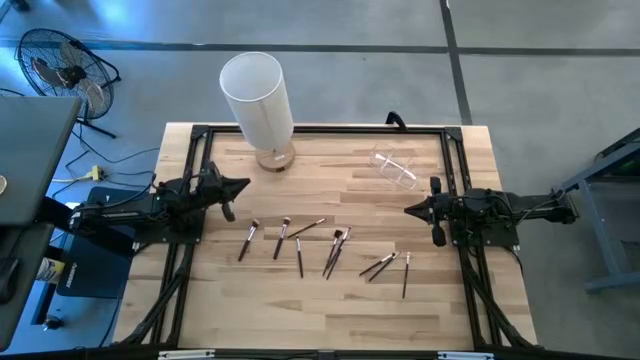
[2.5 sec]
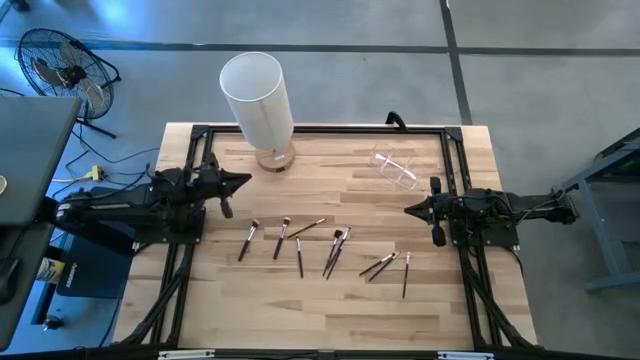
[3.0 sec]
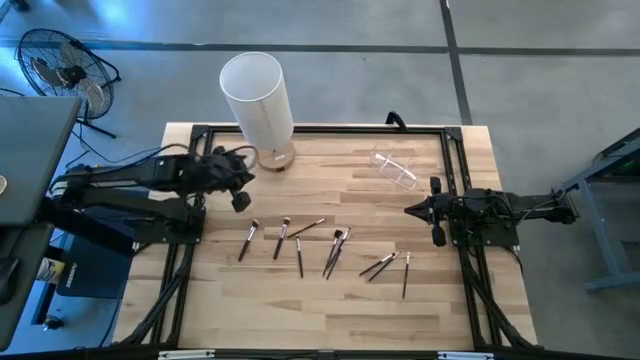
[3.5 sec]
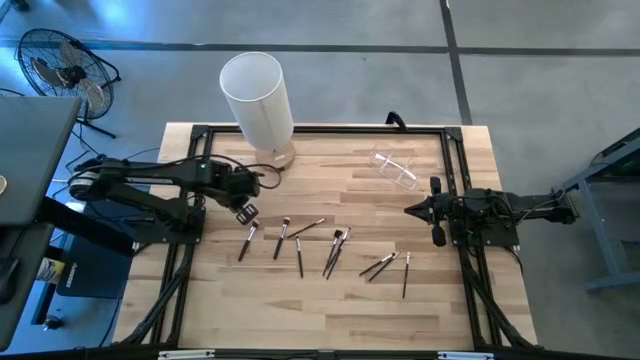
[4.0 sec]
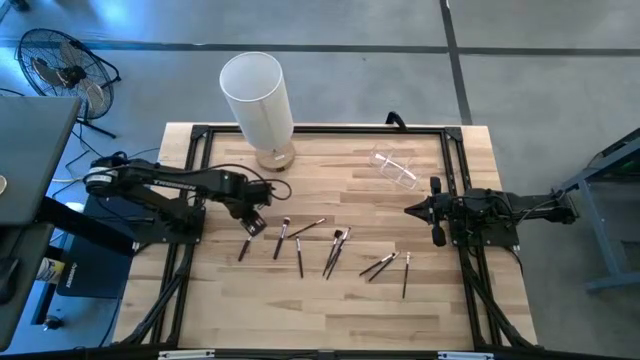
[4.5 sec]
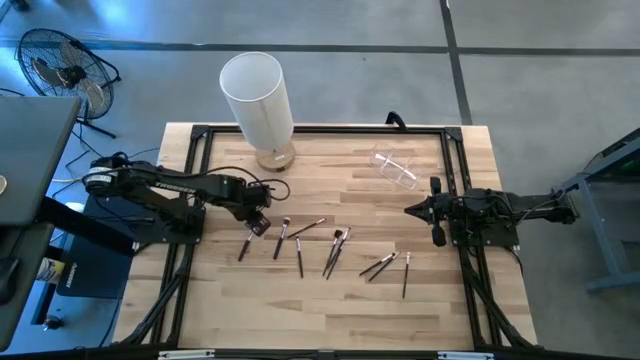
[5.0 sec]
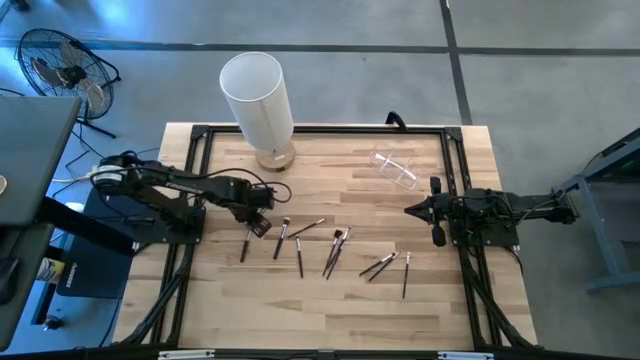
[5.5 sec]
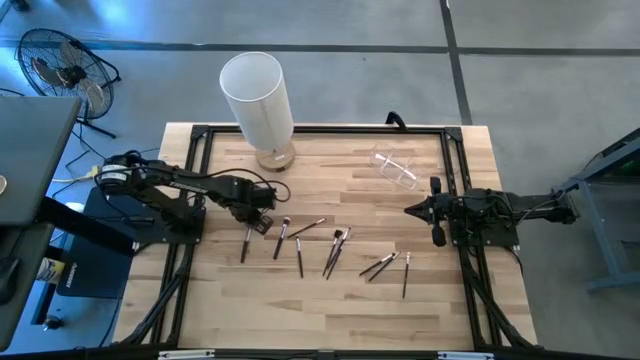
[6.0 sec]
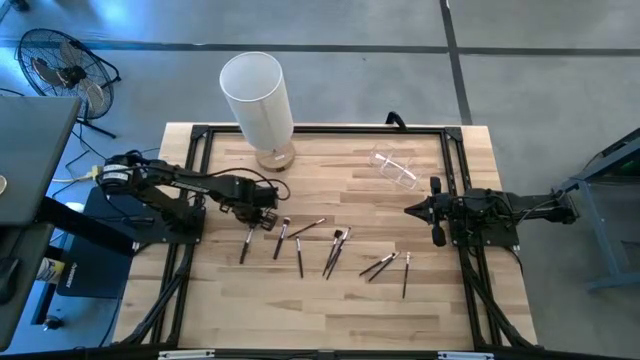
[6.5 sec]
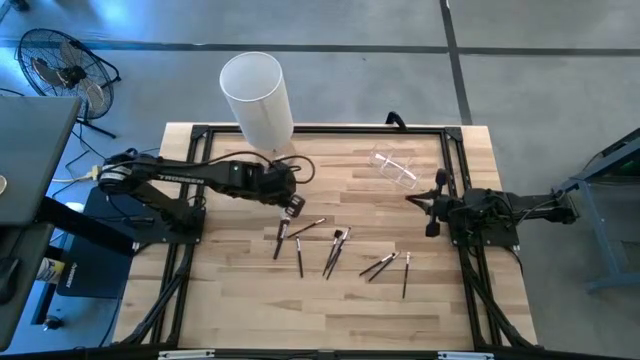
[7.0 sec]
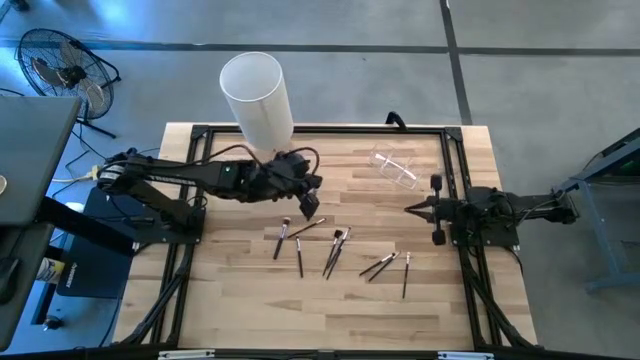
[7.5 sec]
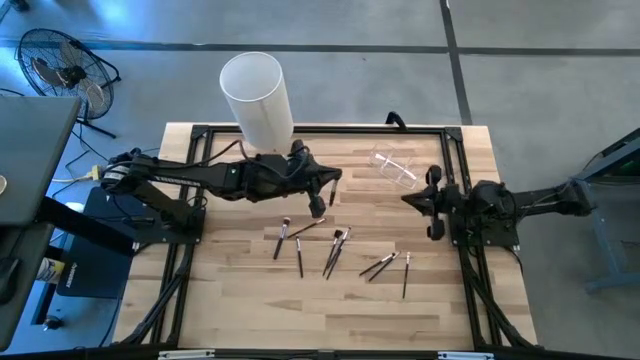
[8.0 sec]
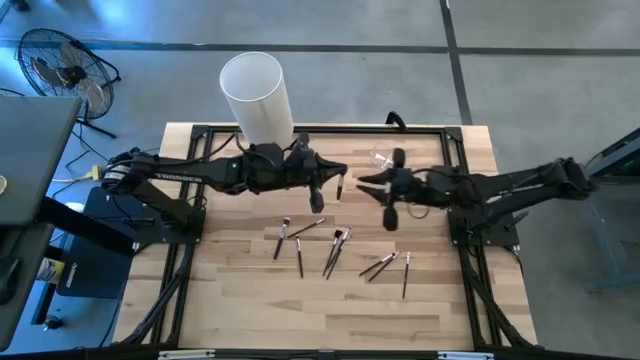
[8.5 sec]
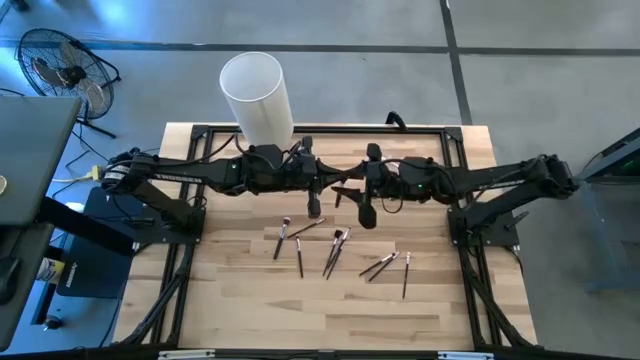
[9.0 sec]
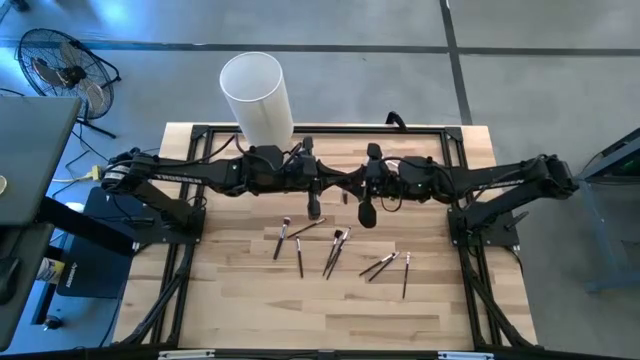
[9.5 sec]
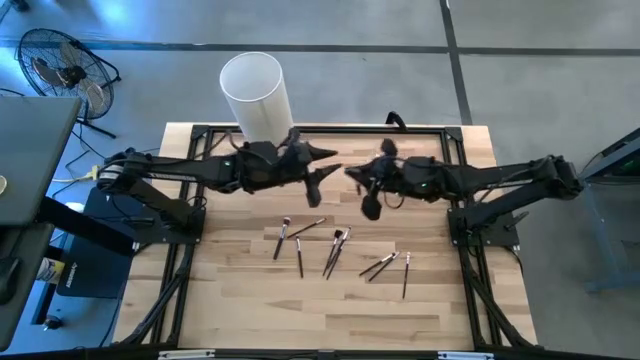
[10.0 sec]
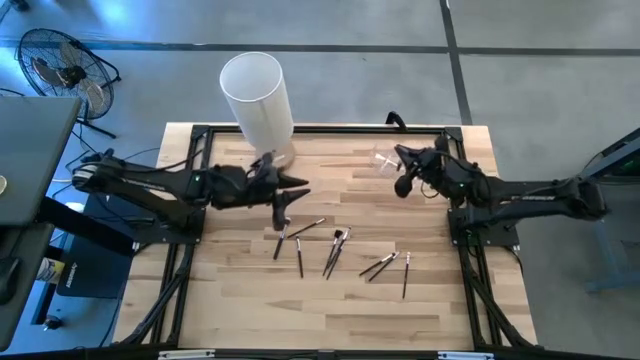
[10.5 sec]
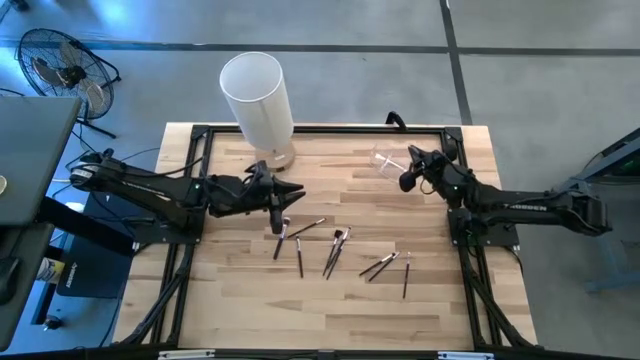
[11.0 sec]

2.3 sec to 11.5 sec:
Task: Put items in baskets/containers
Put the powder brush into the transparent organizer

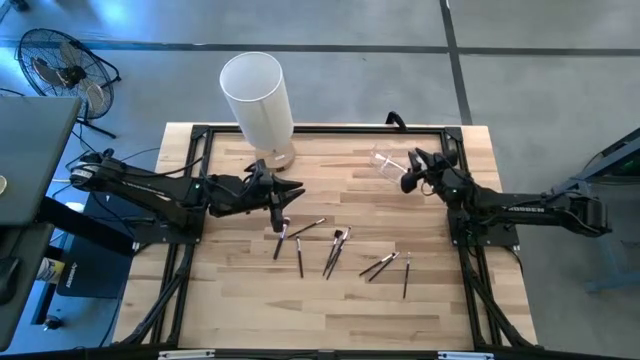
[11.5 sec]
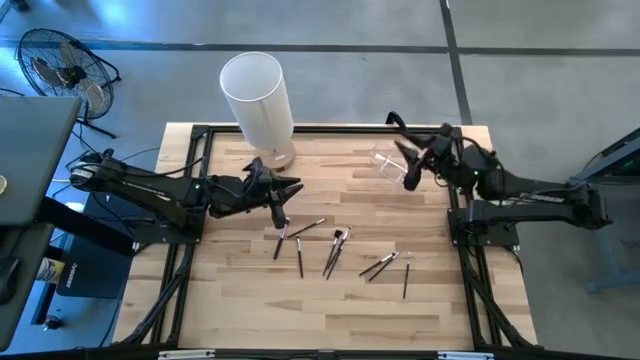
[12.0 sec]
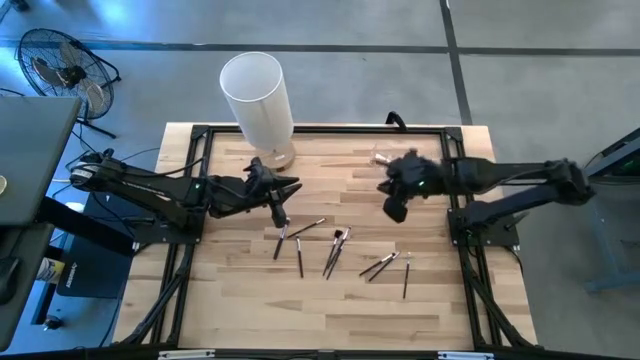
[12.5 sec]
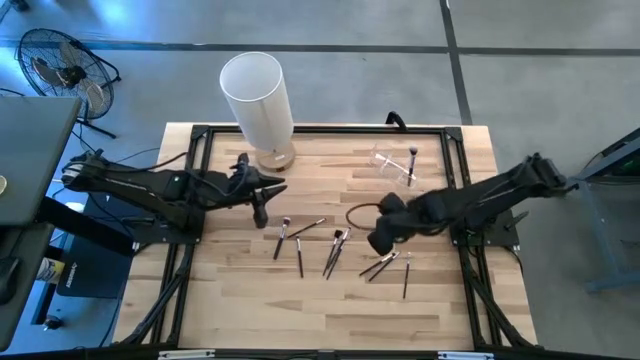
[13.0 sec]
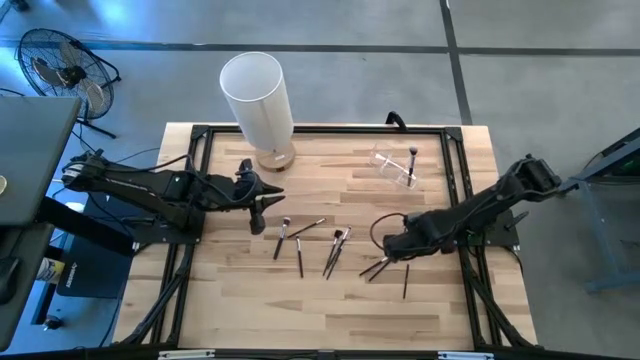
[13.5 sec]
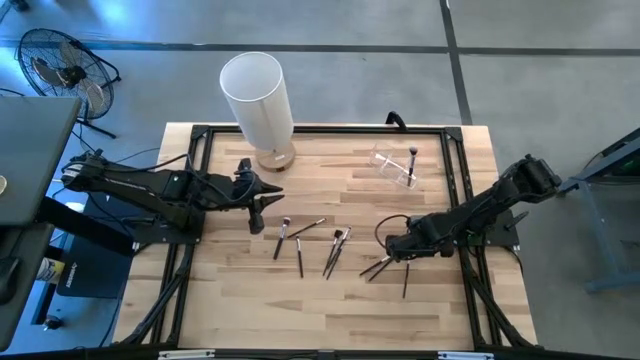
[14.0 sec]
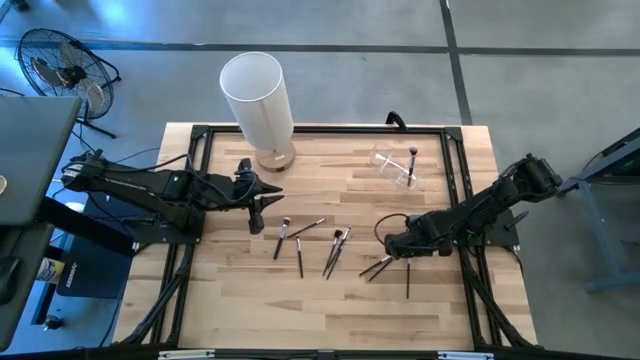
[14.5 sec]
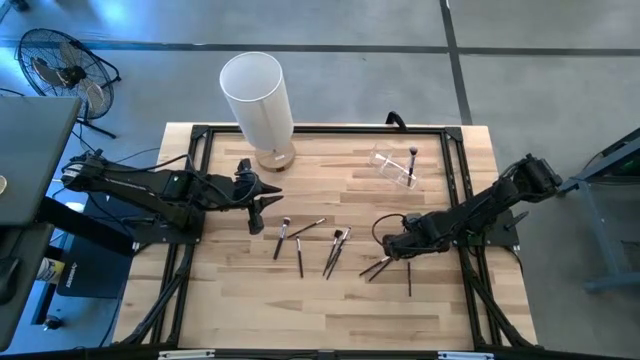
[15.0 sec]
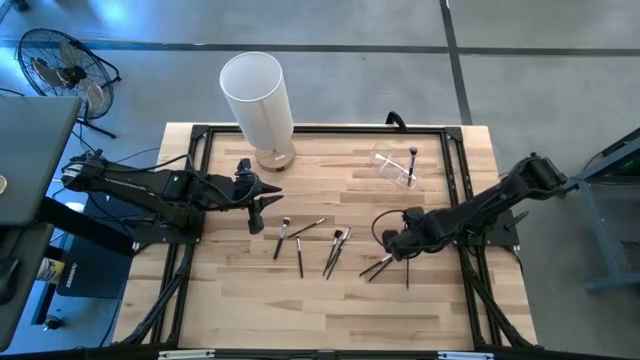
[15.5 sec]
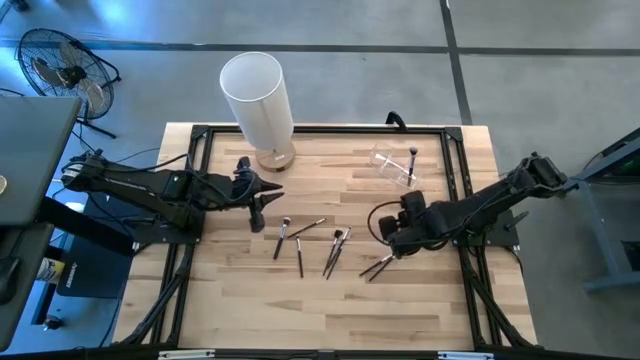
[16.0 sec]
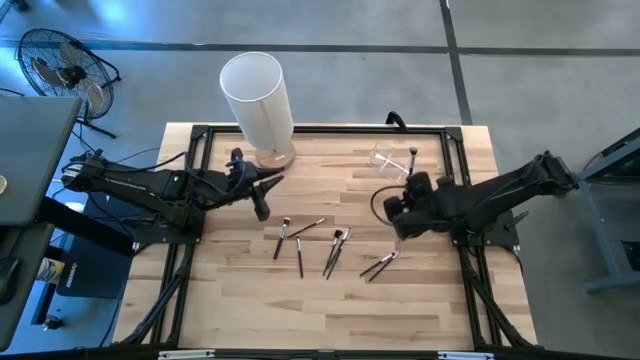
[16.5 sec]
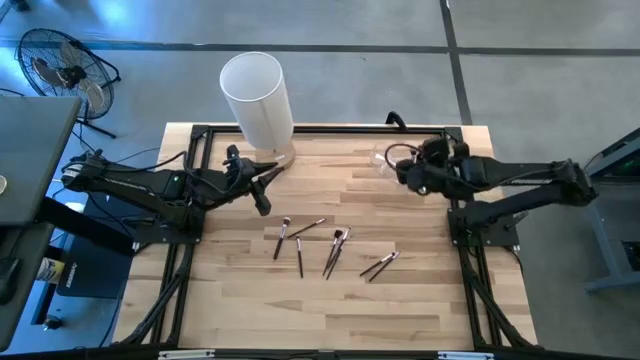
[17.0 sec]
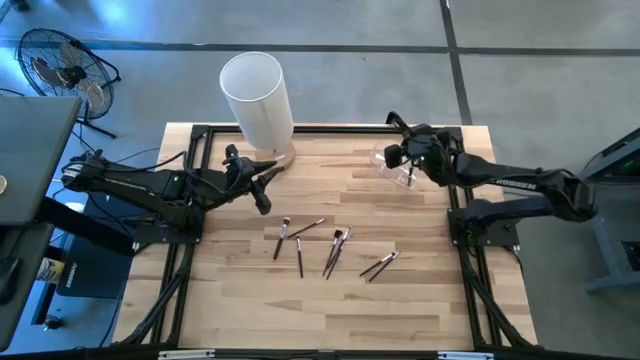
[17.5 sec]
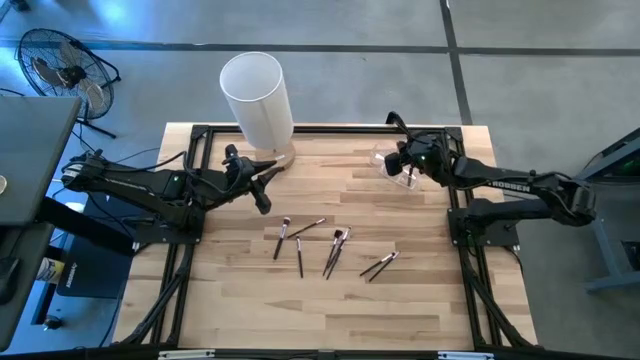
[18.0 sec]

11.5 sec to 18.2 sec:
Put the foundation brush into the transparent organizer

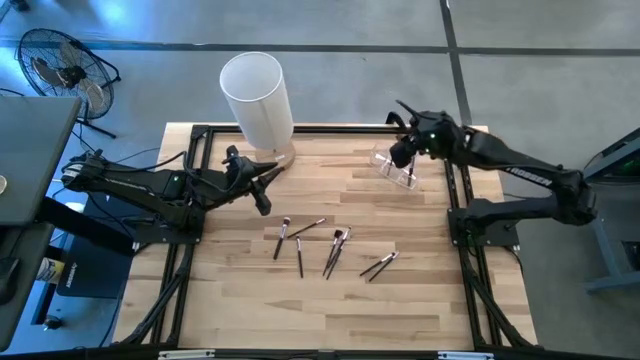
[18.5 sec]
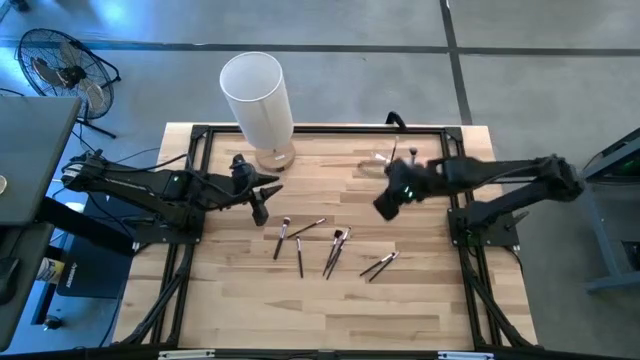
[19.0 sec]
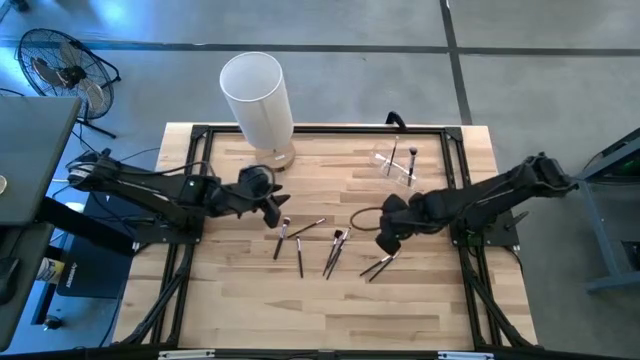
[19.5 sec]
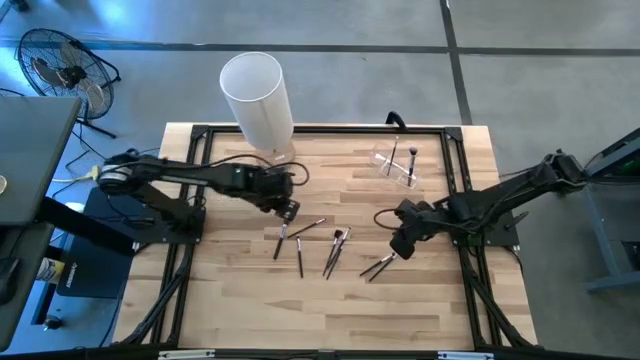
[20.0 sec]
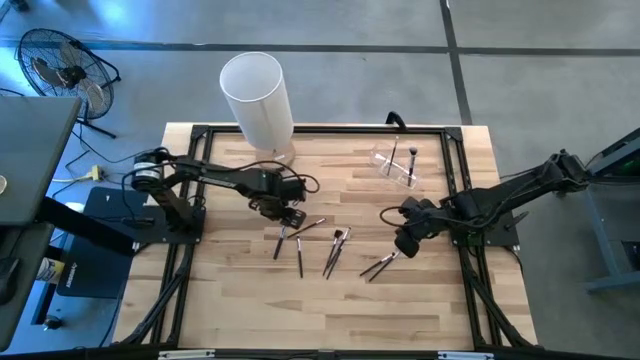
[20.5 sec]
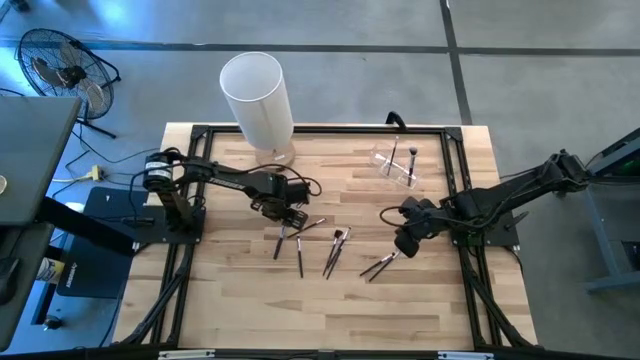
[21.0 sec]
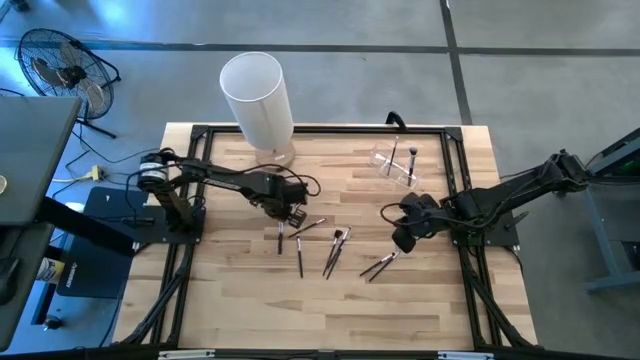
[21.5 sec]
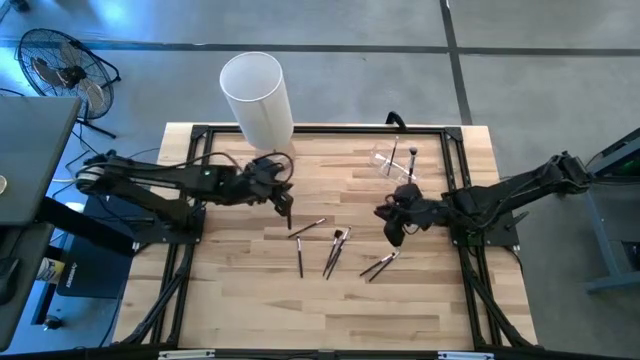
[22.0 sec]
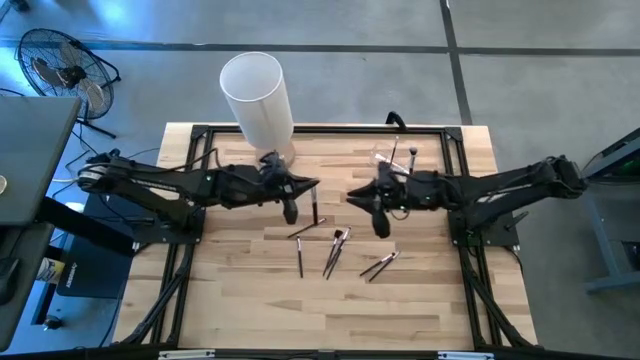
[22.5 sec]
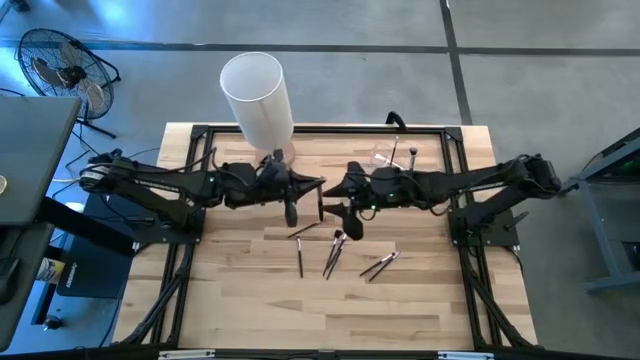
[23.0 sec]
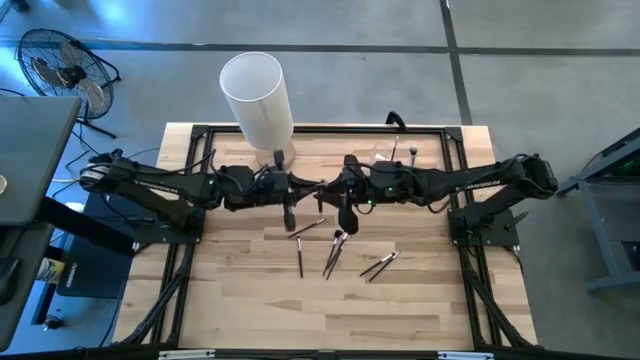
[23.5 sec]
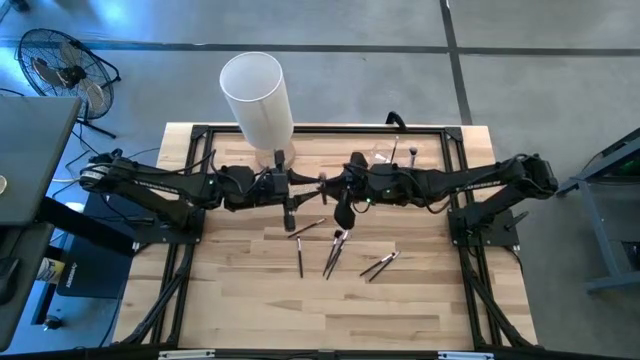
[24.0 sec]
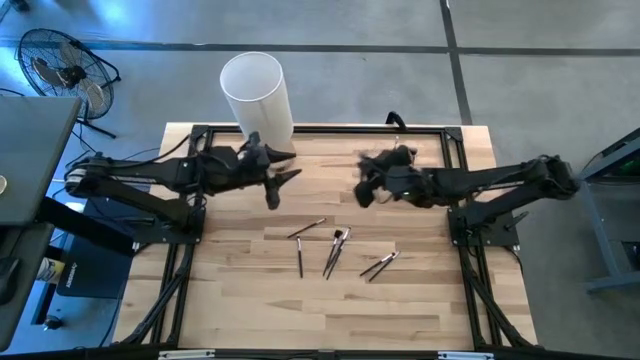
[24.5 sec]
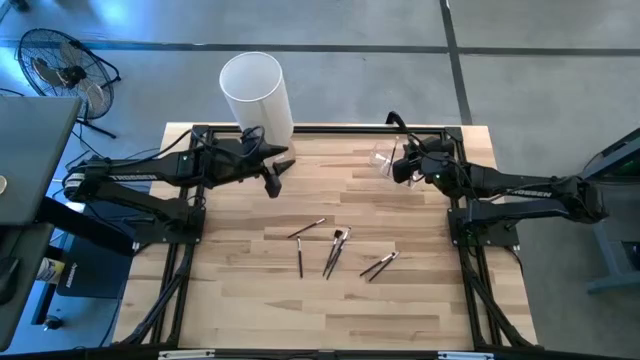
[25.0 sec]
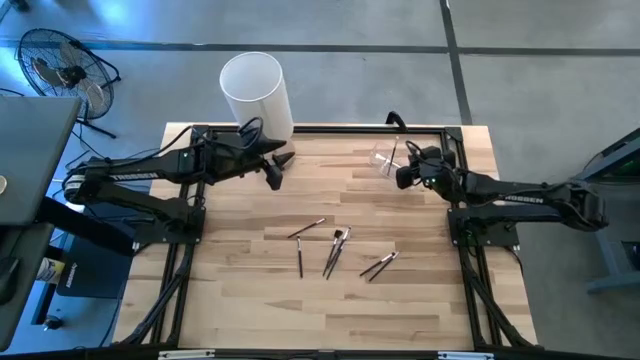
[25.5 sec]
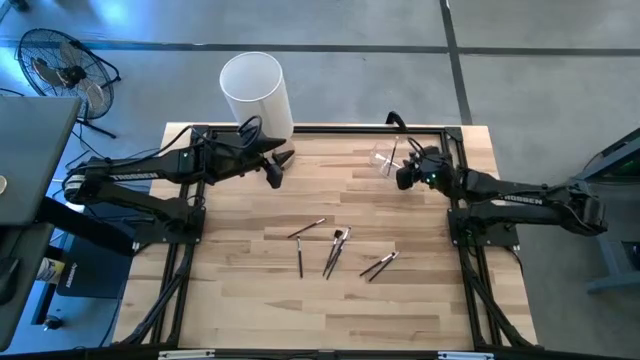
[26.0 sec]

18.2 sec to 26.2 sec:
Put the powder brush into the transparent organizer
